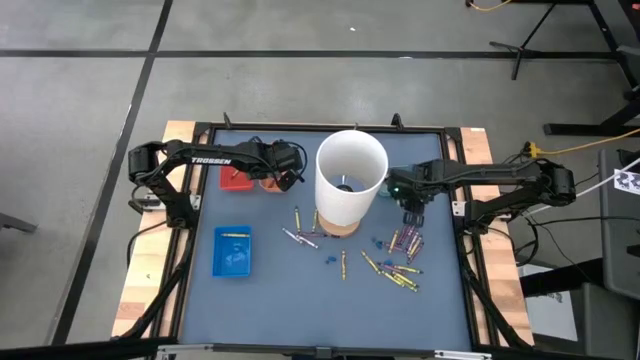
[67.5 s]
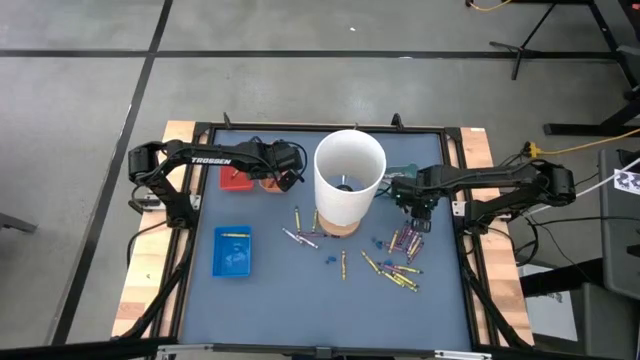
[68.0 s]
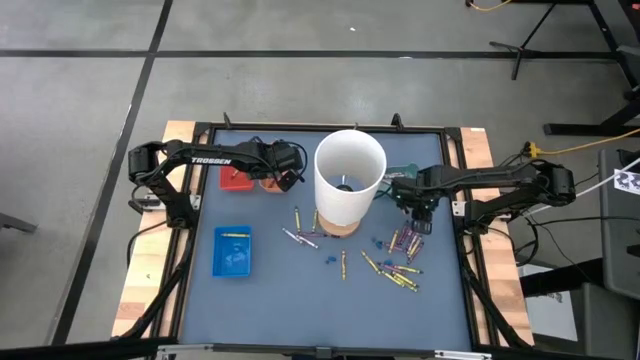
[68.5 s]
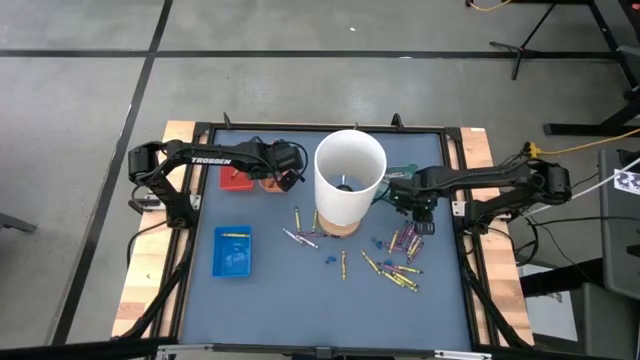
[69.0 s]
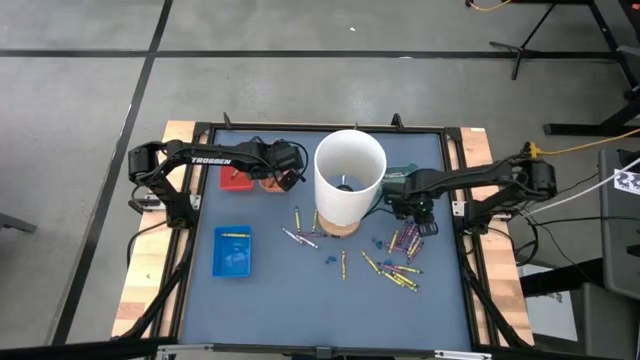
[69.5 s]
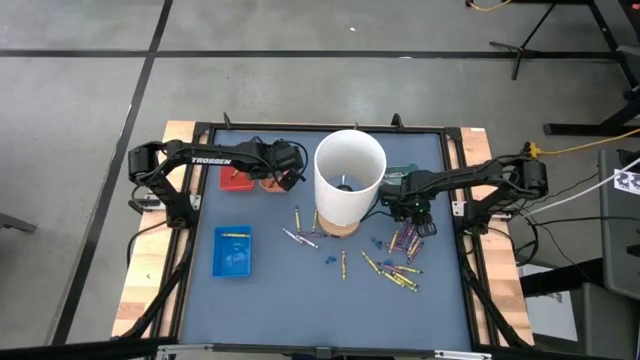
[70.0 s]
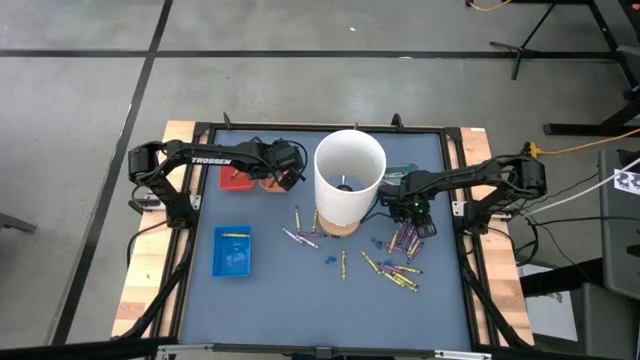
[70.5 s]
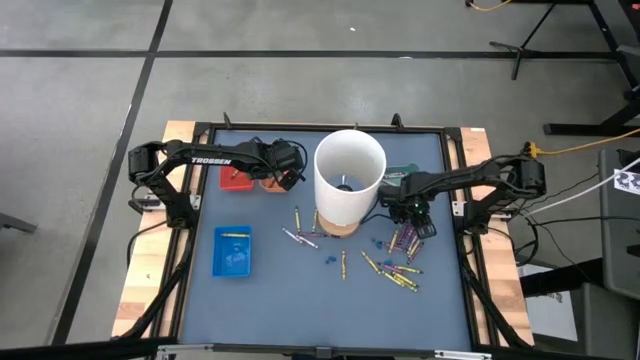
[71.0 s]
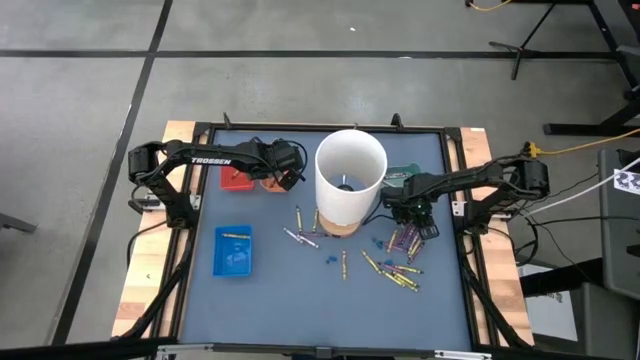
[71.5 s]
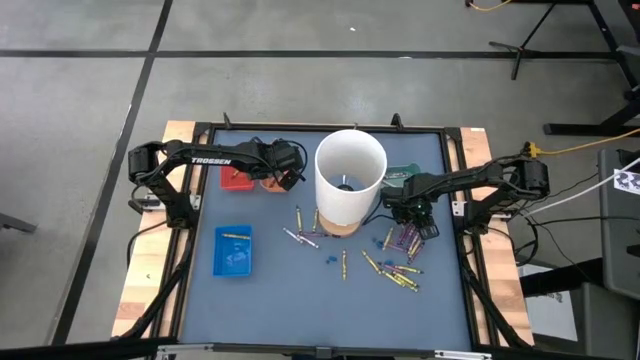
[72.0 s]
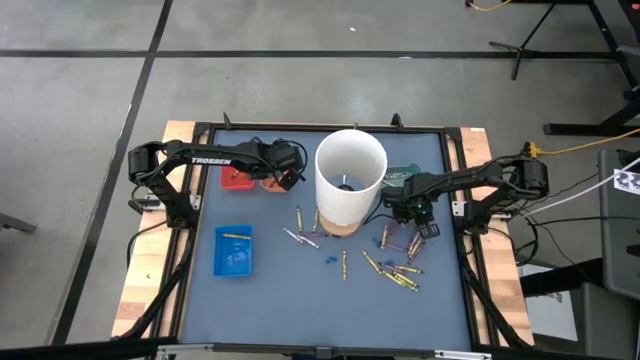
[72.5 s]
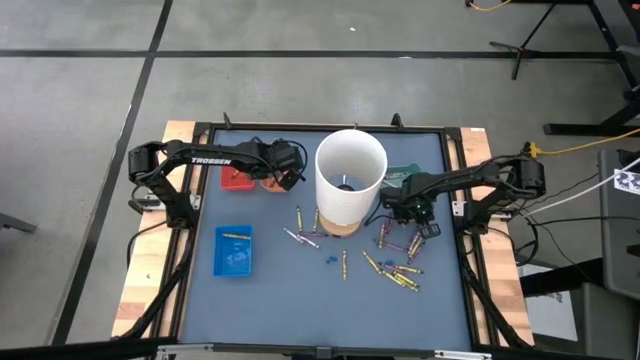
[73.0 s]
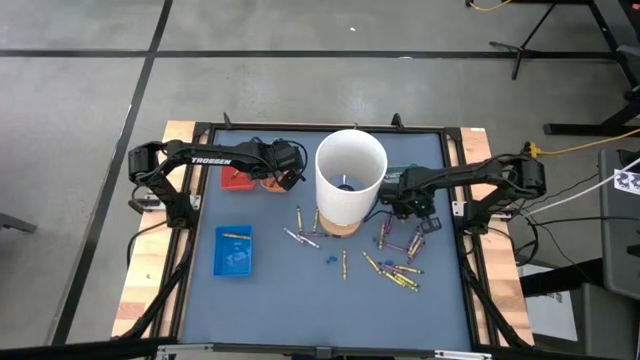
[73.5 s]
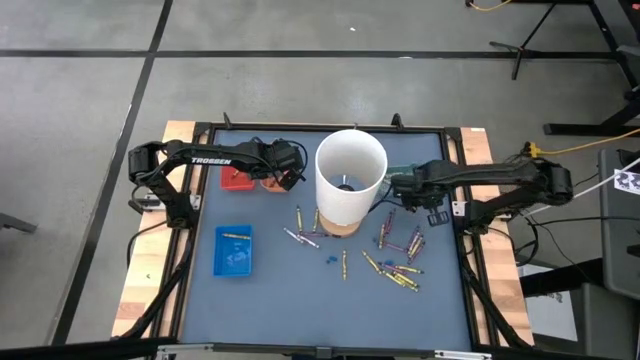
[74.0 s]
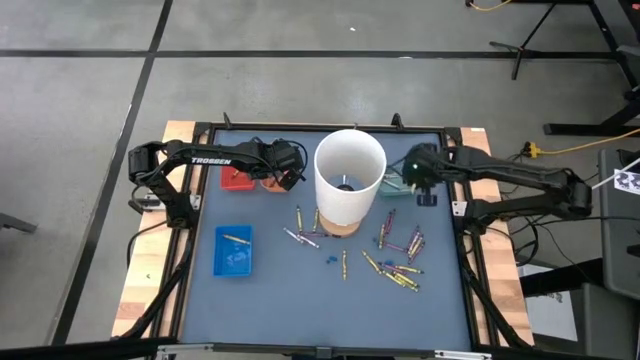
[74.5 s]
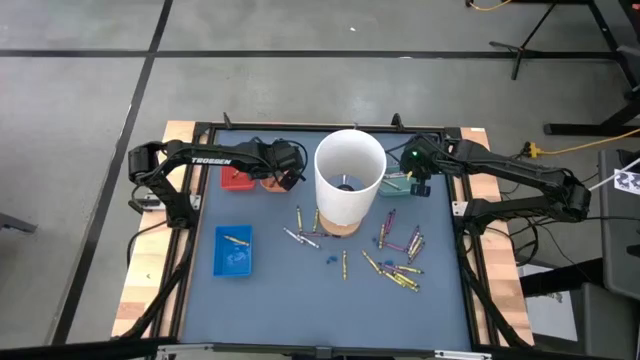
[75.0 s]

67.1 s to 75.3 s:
Task: Sort crayons
Put the gray crayon into the green bin

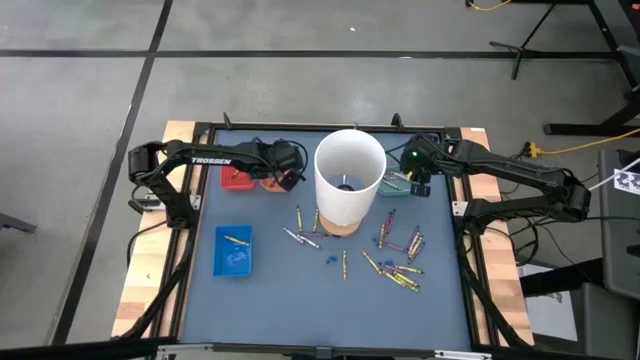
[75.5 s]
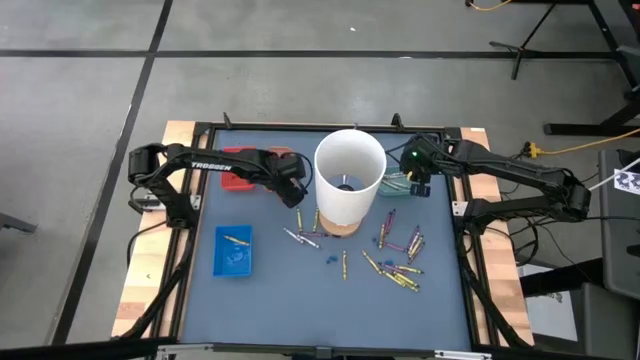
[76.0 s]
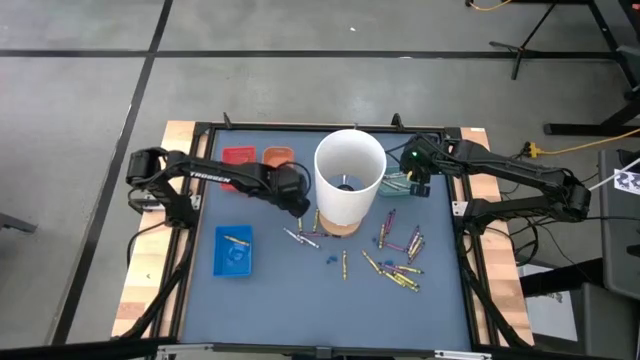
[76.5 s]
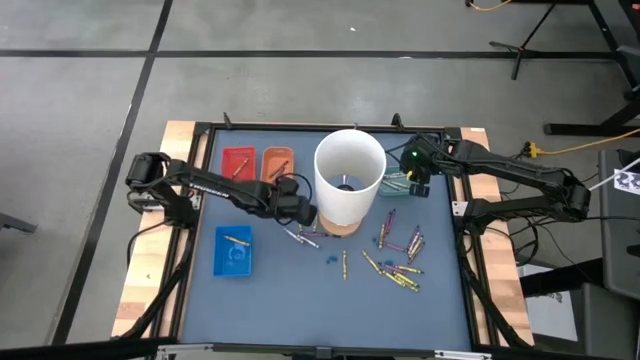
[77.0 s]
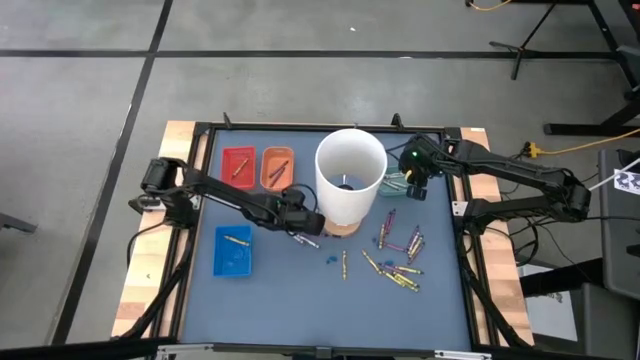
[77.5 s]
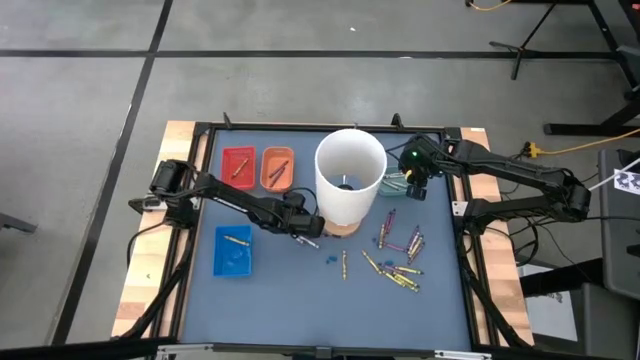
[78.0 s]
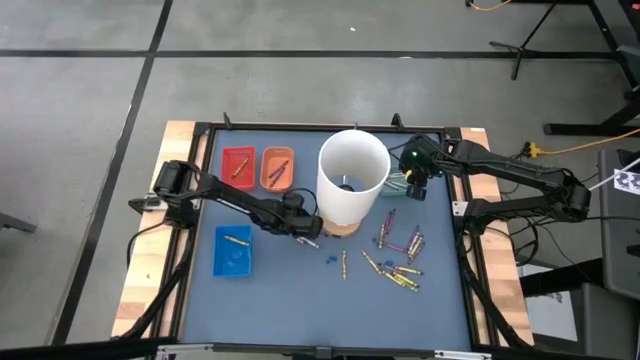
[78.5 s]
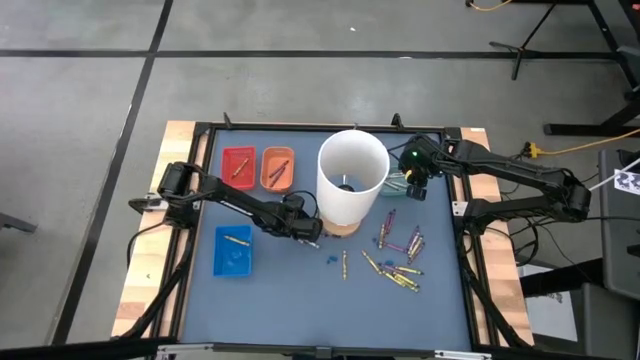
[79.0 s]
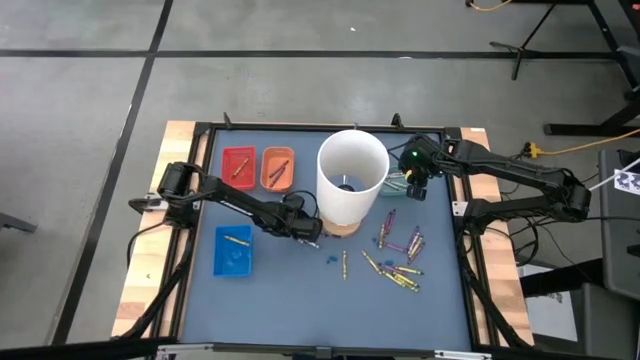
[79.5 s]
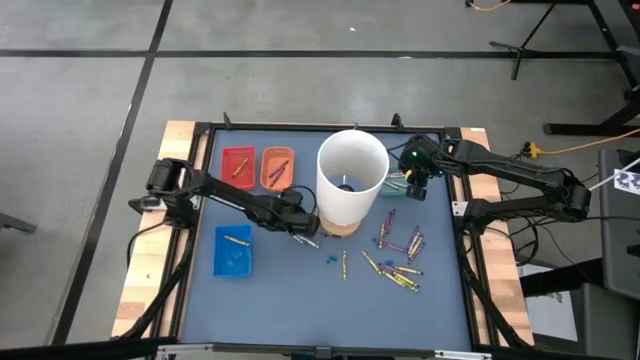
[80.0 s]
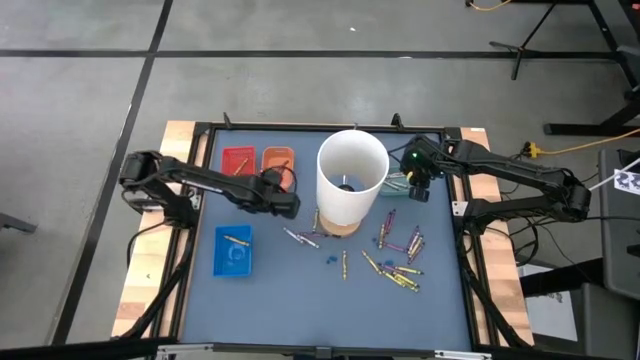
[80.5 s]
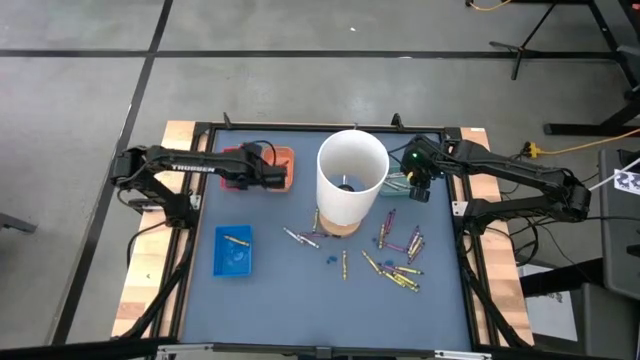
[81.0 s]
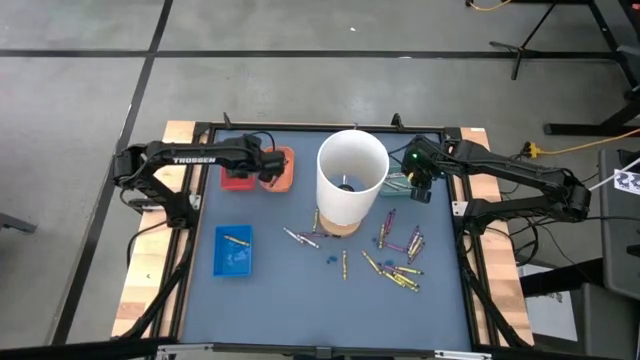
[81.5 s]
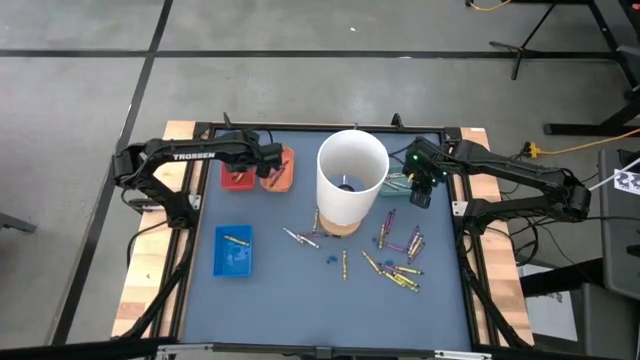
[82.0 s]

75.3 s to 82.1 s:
Put the green crayon into the red bin

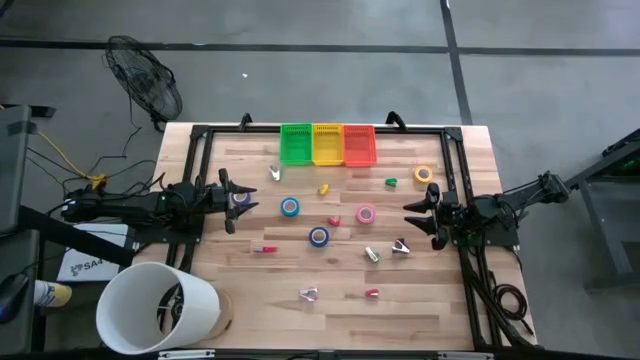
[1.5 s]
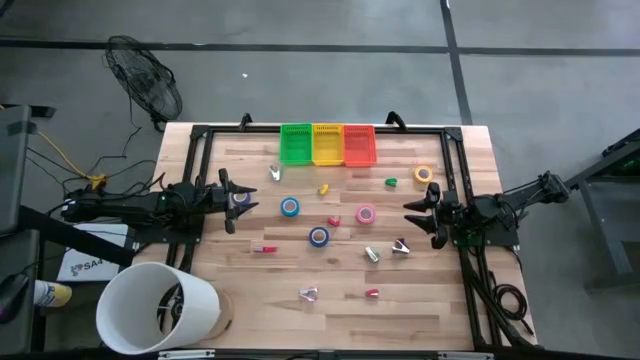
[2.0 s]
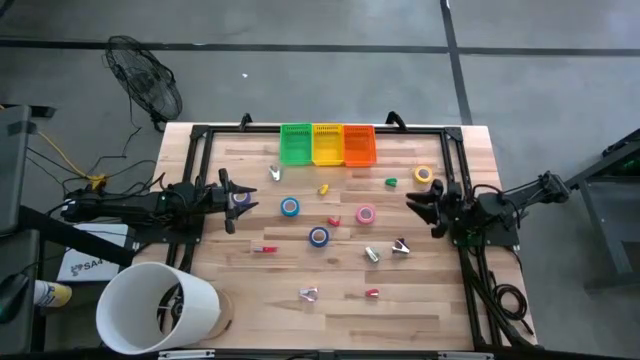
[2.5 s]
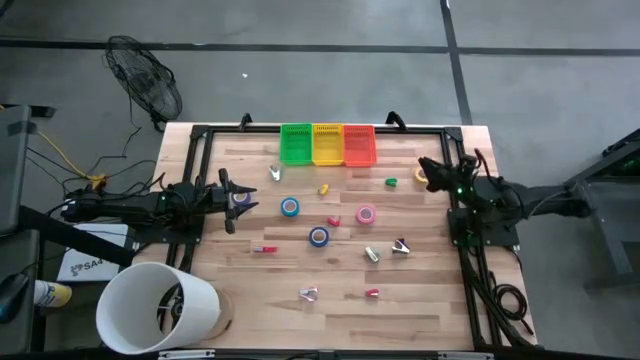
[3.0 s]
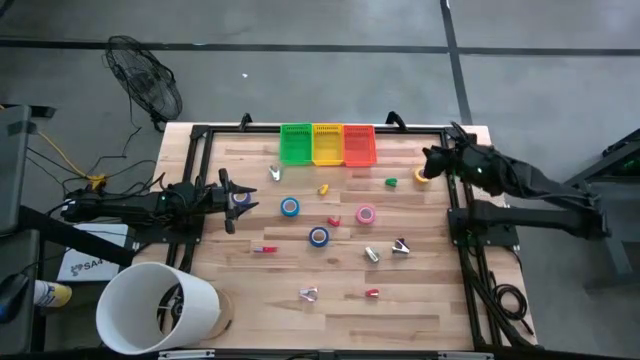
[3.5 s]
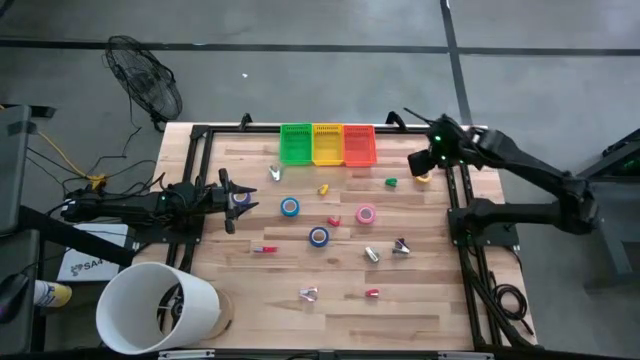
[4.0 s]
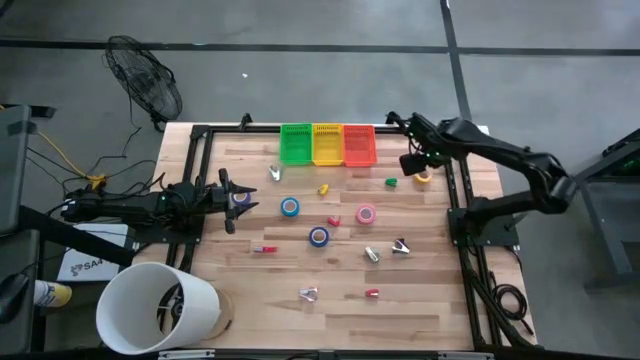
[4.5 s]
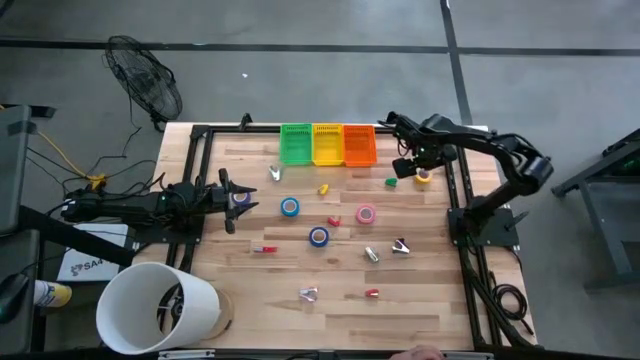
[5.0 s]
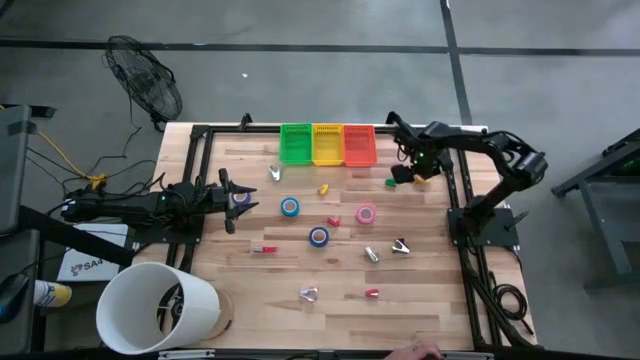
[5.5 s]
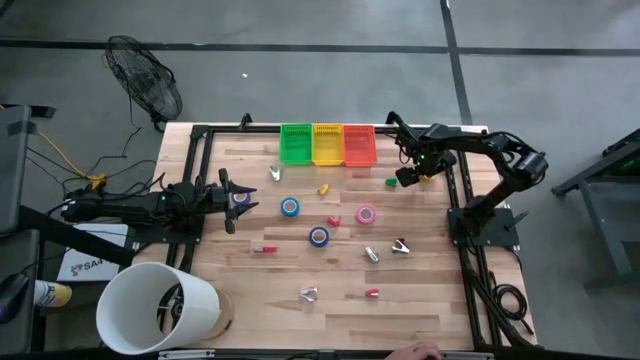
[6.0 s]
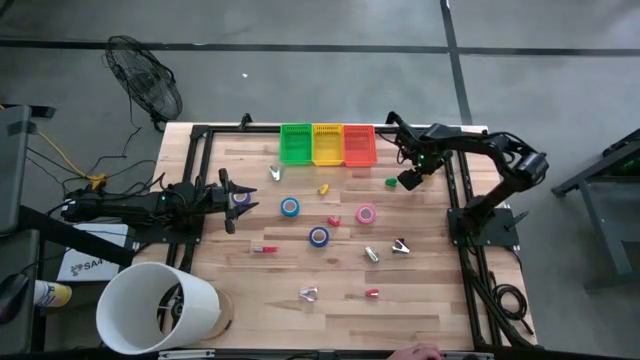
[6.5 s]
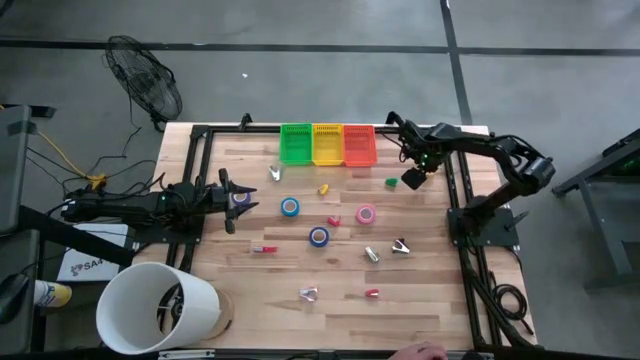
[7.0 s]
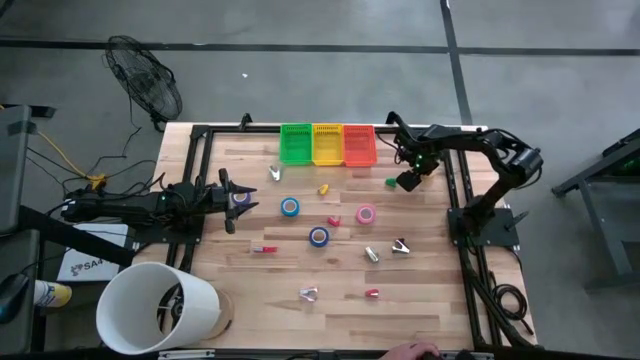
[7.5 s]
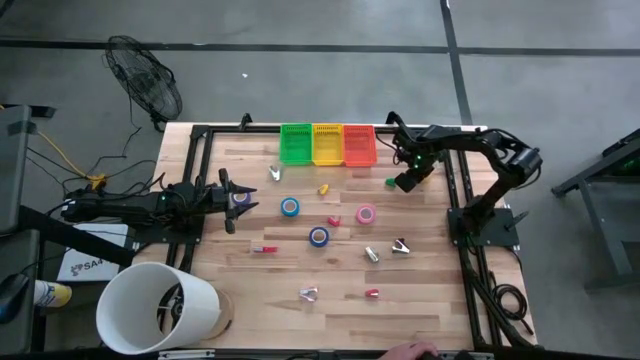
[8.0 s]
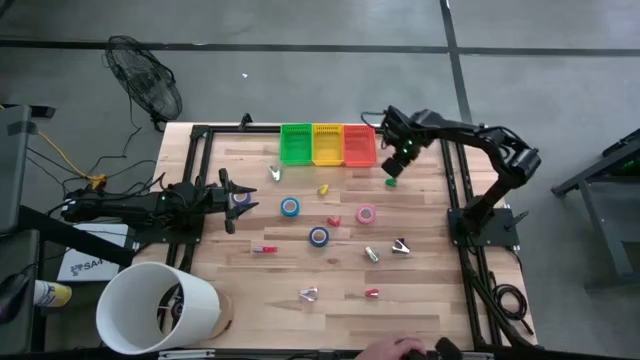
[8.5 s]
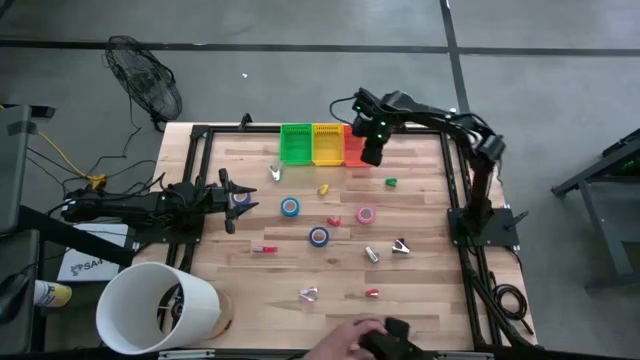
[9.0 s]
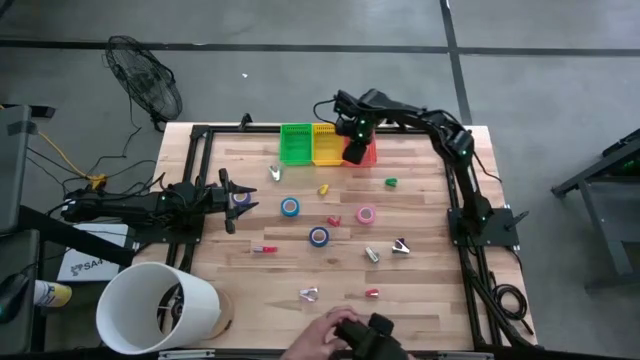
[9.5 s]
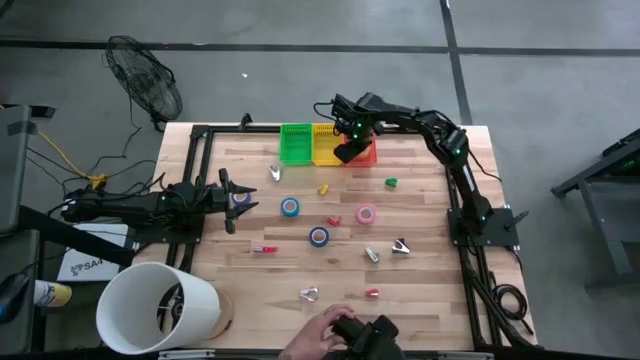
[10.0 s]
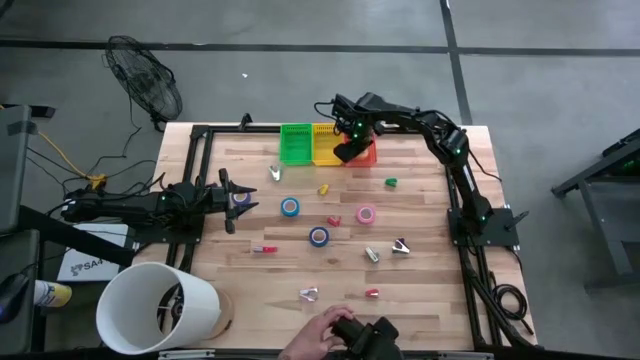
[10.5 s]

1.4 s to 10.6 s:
Task: Pick and place Stapler, Stapler remover, tape
Put the yellow tape into the orange bin
